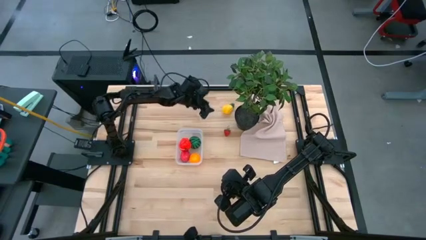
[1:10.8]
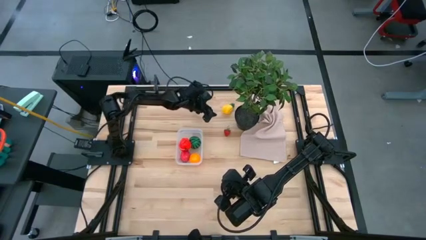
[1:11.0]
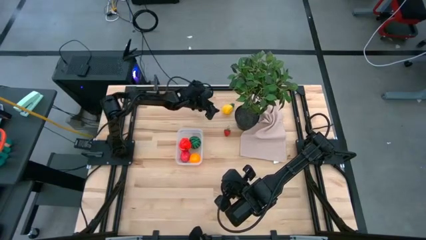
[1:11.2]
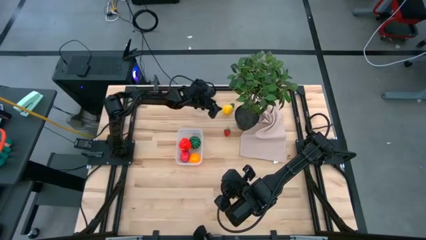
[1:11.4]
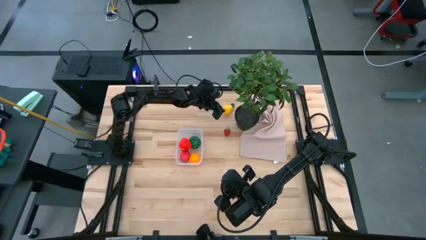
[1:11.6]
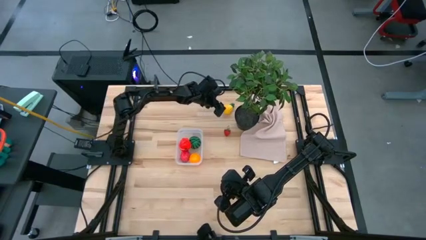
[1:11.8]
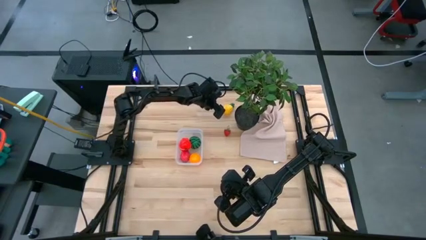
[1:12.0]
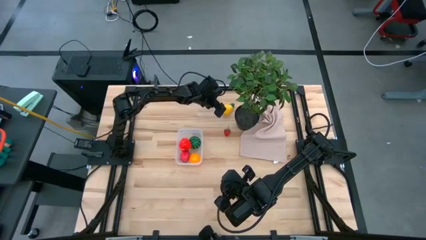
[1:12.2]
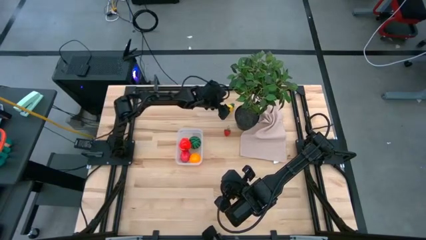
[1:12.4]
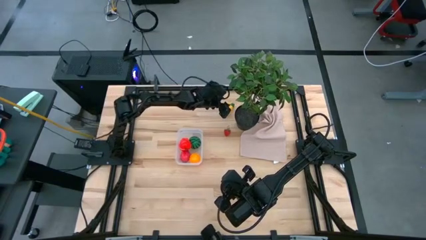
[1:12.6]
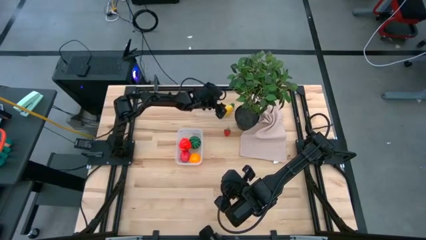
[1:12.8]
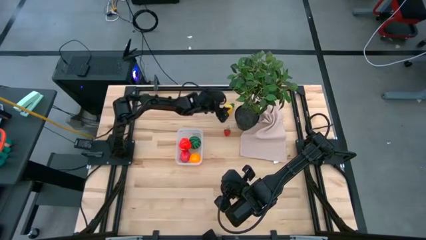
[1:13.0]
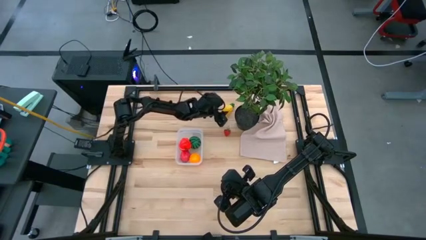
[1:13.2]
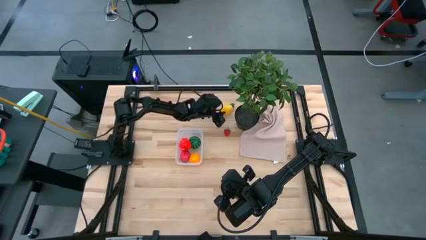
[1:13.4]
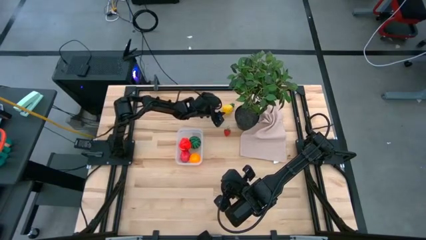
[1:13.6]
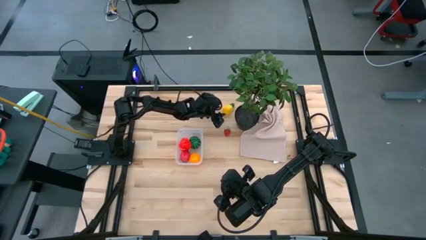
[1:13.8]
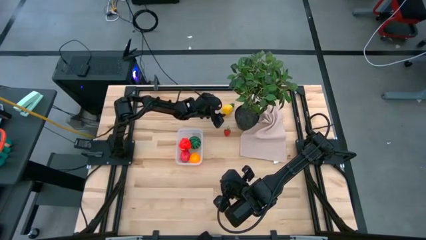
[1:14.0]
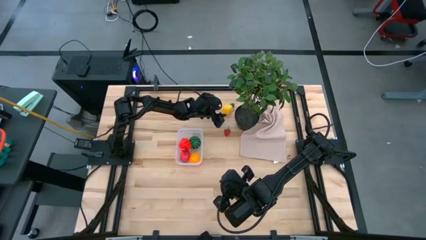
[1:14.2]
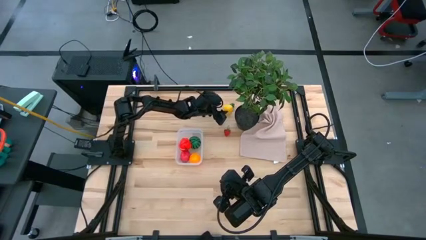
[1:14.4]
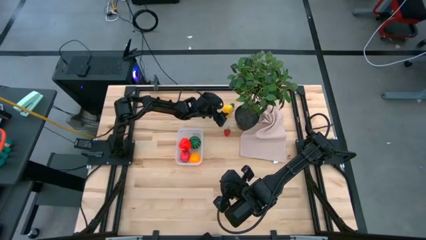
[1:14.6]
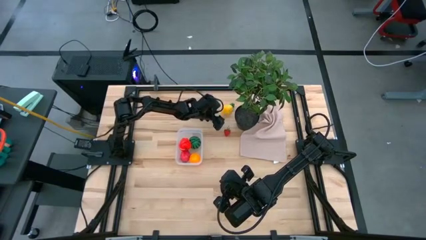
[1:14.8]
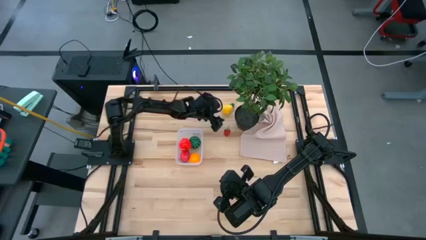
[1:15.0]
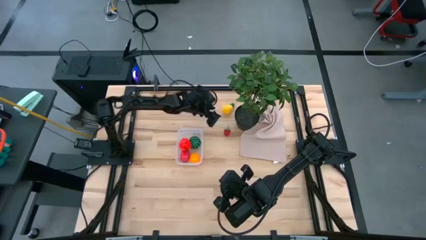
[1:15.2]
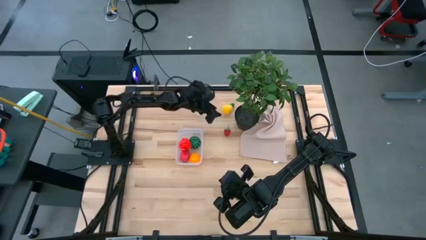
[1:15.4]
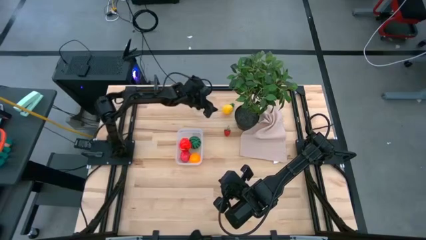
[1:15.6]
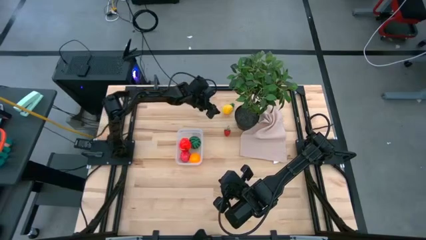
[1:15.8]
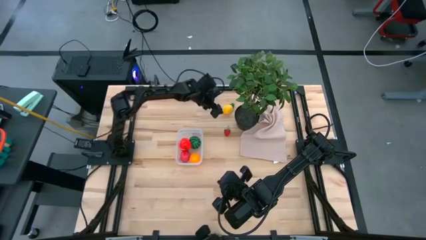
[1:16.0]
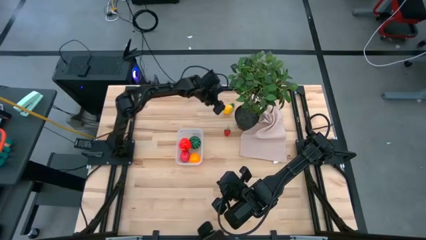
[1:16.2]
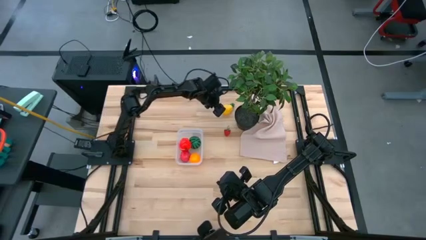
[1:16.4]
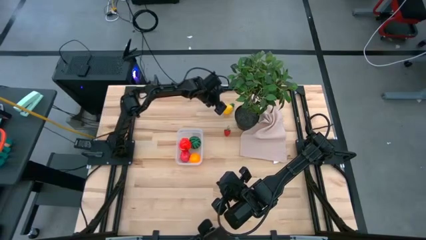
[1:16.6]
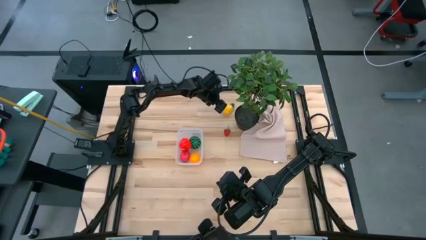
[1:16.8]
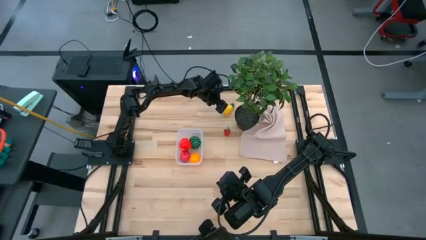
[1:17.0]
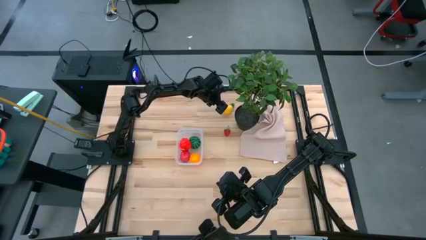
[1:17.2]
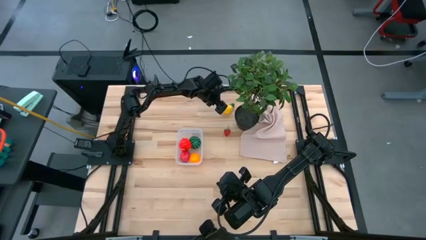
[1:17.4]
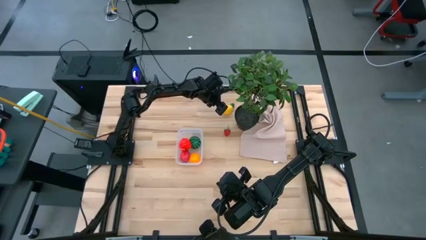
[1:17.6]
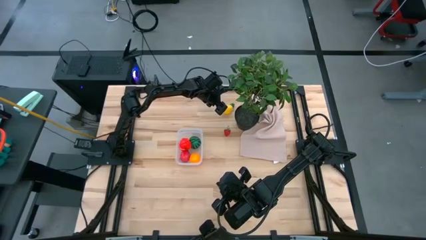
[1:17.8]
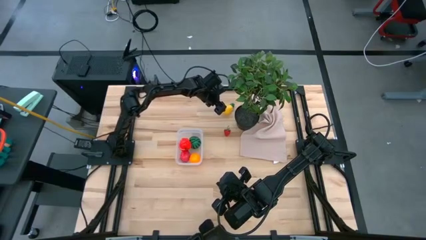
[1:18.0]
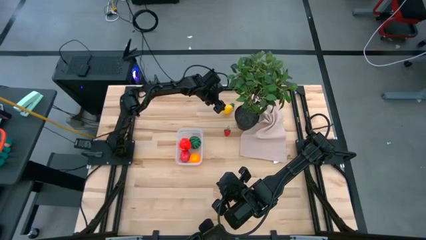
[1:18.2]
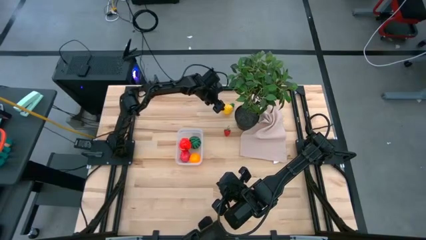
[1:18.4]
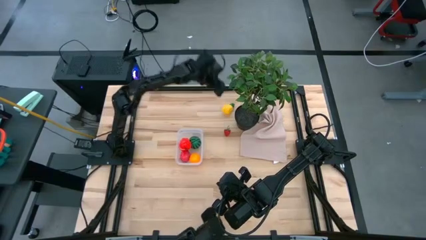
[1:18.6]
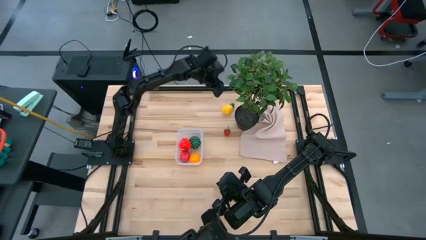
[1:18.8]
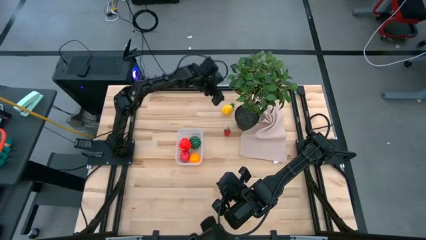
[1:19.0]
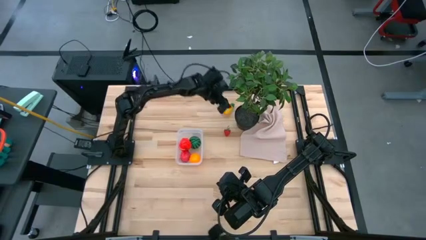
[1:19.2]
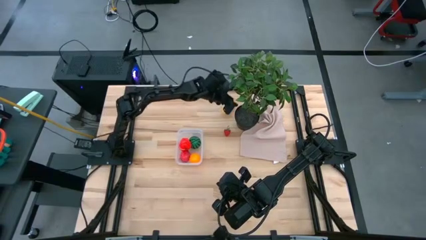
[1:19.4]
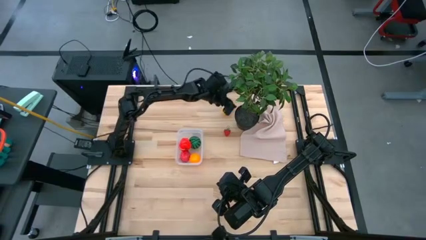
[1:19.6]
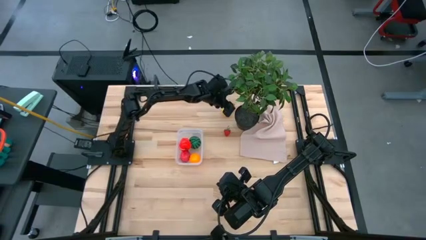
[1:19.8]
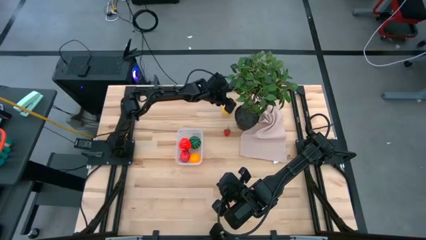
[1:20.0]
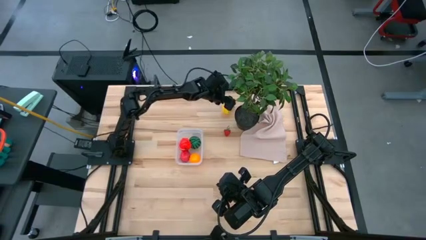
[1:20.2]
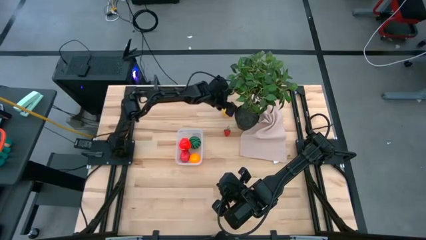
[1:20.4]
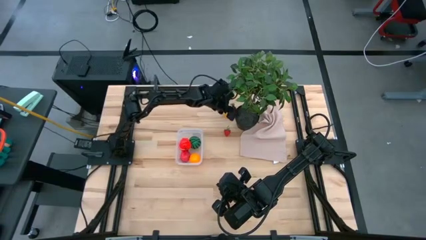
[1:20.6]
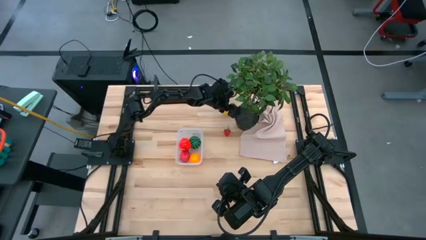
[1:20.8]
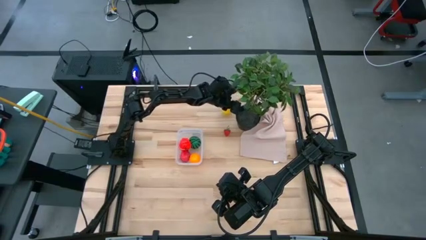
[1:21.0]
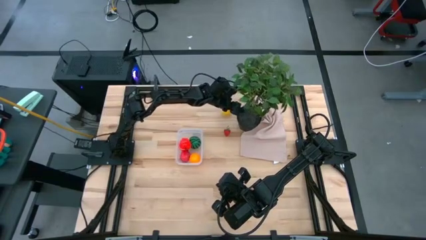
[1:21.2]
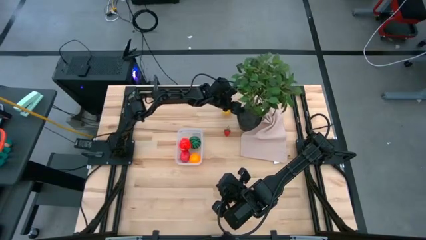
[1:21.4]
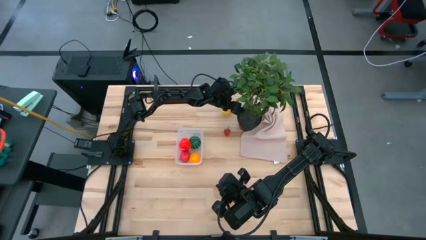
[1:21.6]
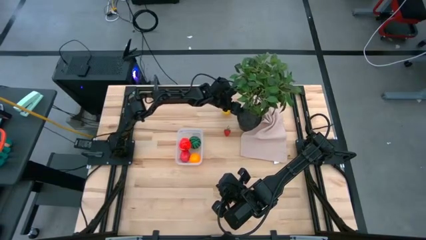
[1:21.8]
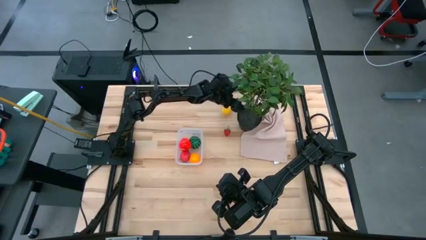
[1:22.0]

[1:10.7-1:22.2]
Task: Pick and placing Produce into tupperware
Adjust the flower pot

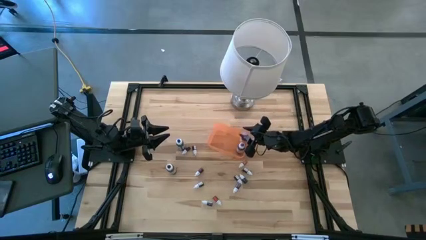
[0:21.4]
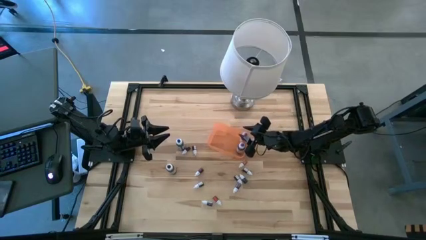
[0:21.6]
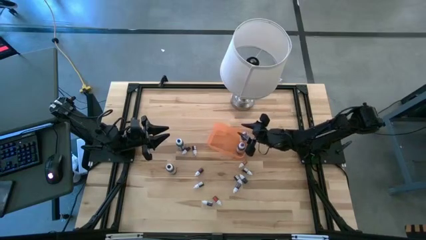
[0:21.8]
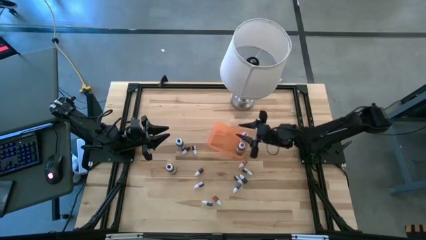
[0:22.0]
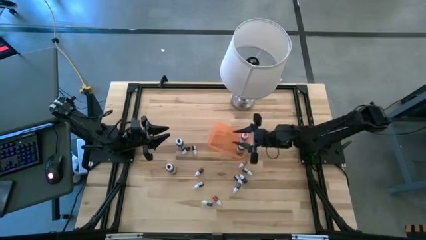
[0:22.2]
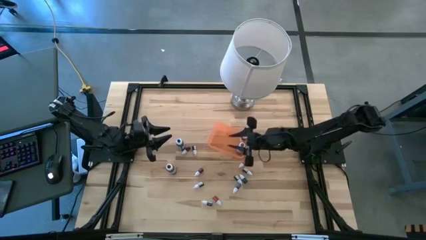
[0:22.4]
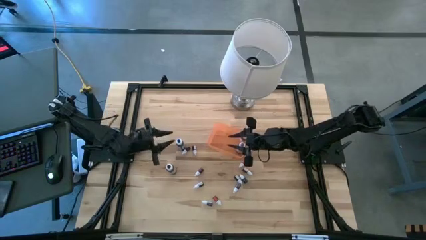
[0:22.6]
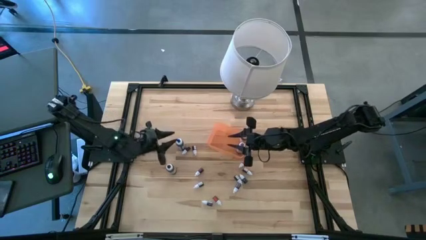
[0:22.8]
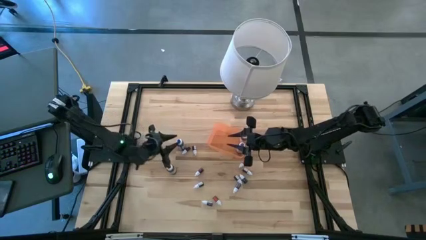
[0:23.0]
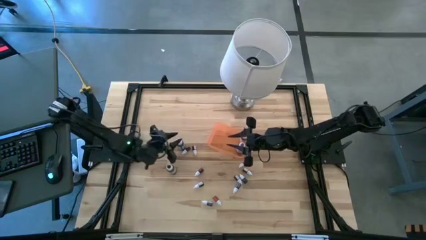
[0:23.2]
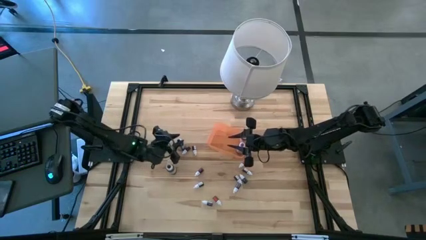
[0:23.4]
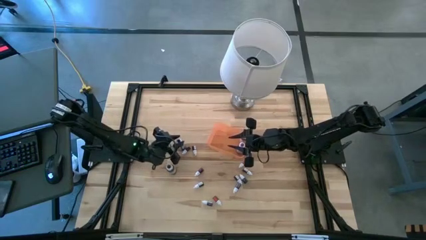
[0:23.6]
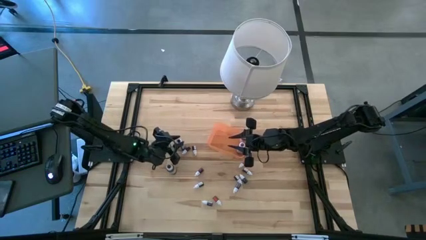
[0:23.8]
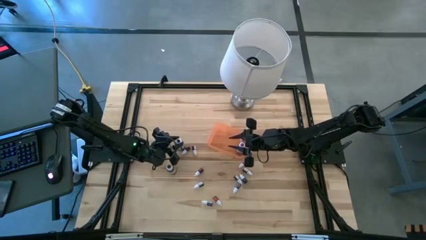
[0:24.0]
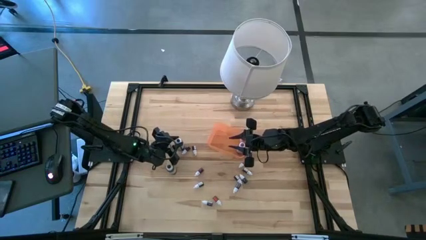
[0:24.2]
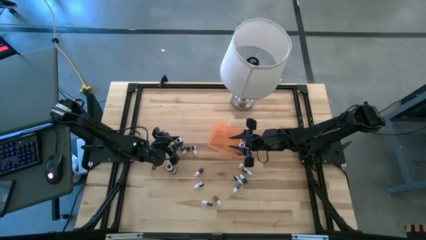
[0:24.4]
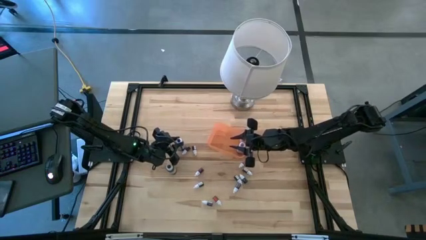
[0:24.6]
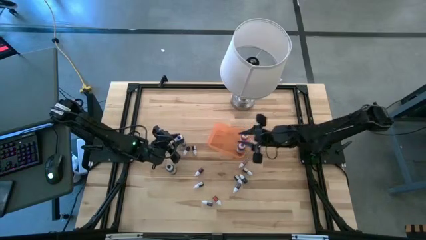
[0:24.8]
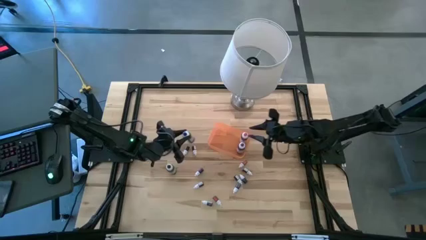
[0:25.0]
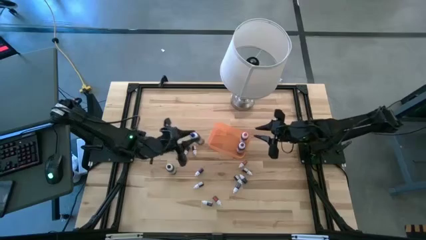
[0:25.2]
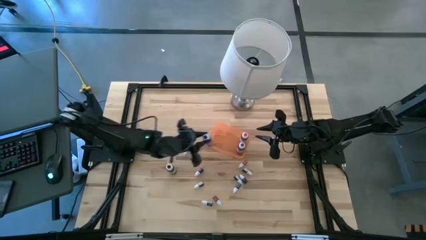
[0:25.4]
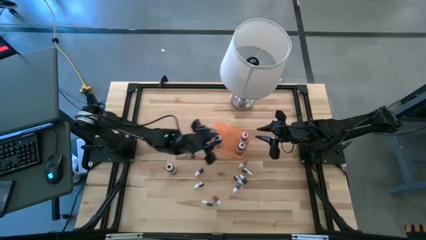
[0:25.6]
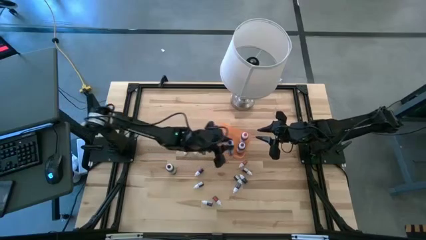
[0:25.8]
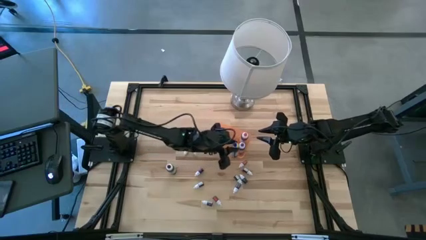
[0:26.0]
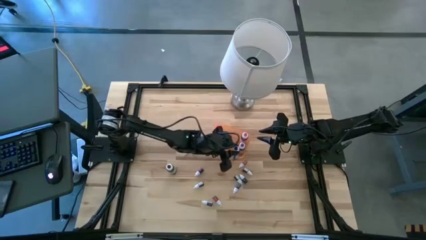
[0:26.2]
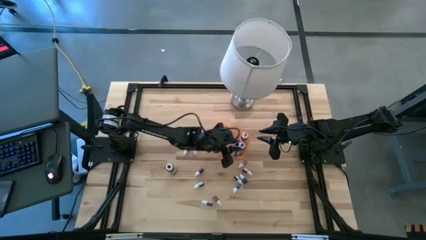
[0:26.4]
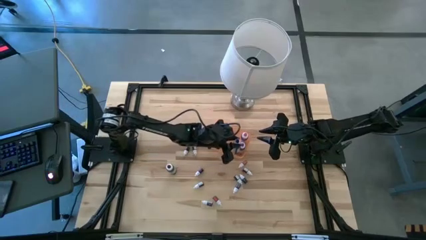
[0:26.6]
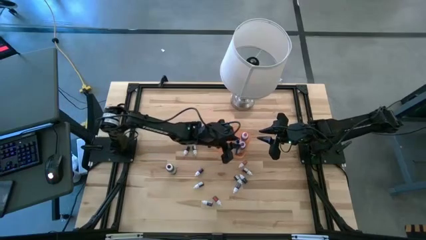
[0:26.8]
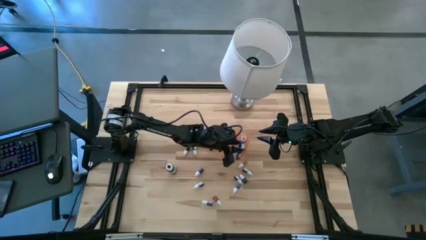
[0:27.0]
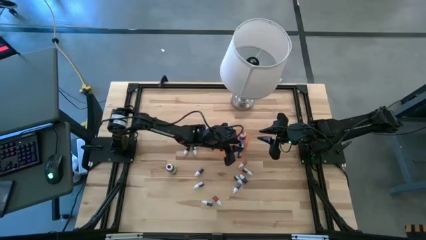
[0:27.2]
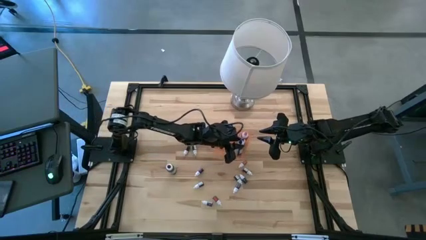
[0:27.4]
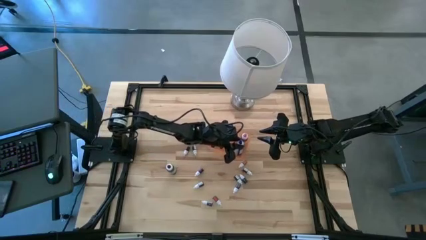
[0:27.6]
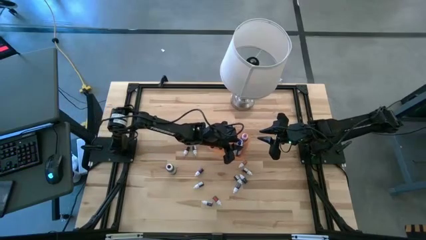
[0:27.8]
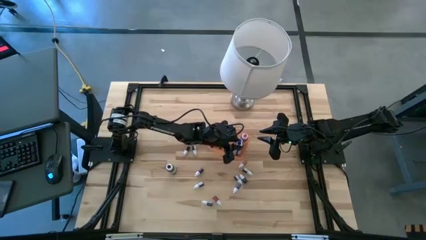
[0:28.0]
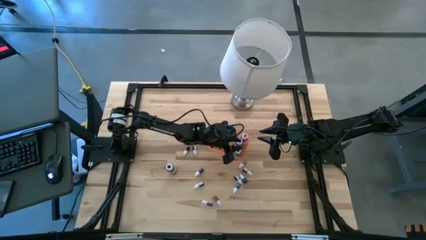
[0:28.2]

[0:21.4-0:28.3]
Task: Pick & Place food coloring
Put the large blue food coloring bottle into the orange bin
